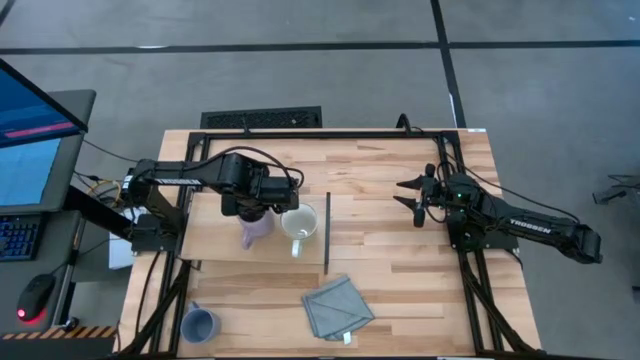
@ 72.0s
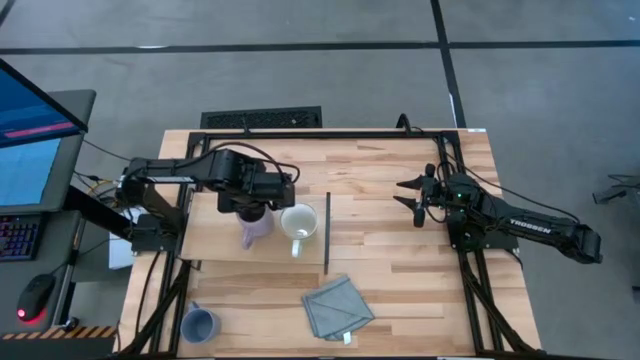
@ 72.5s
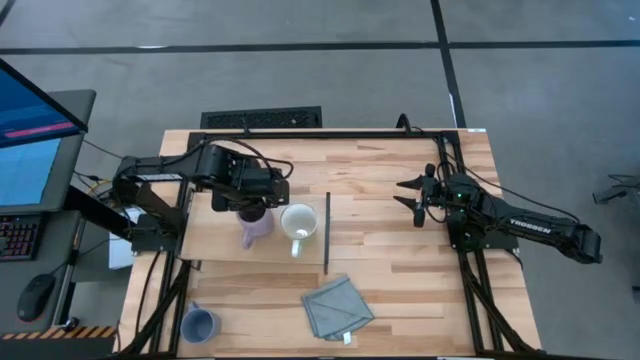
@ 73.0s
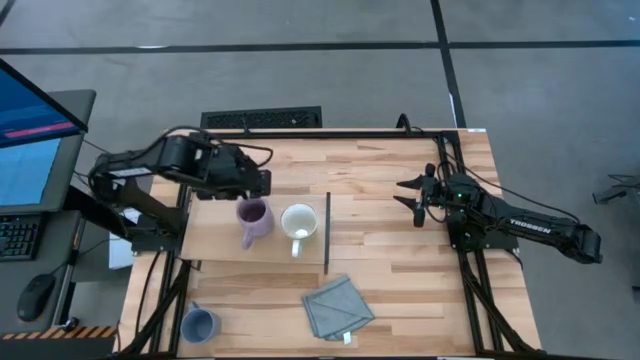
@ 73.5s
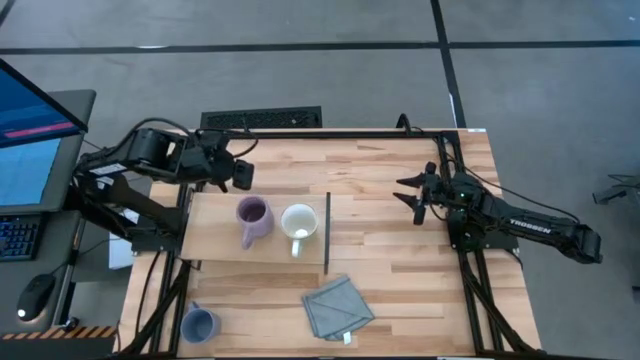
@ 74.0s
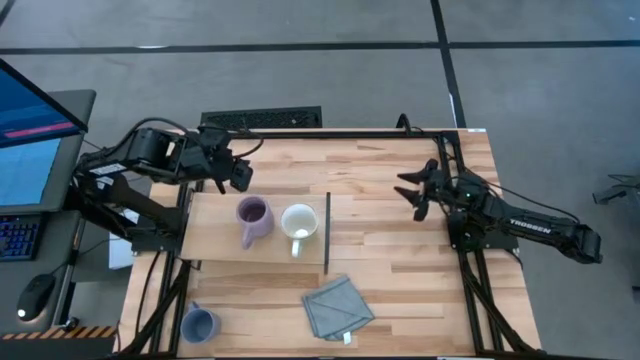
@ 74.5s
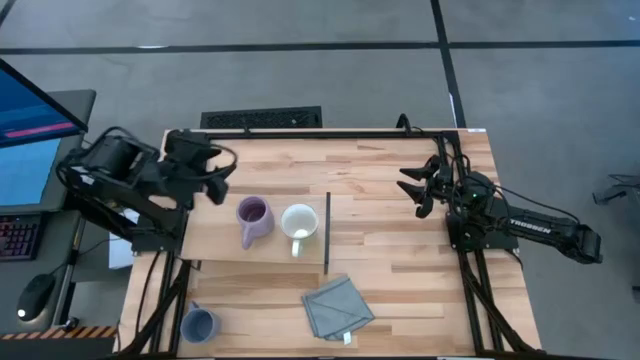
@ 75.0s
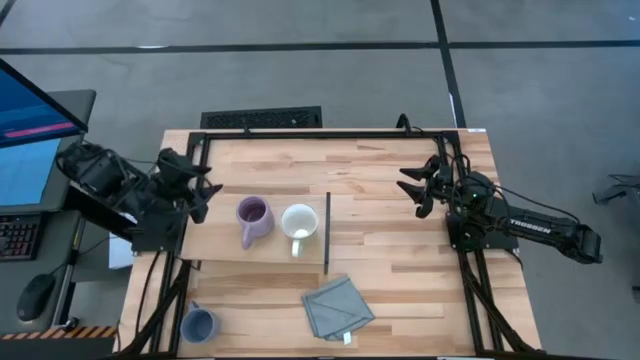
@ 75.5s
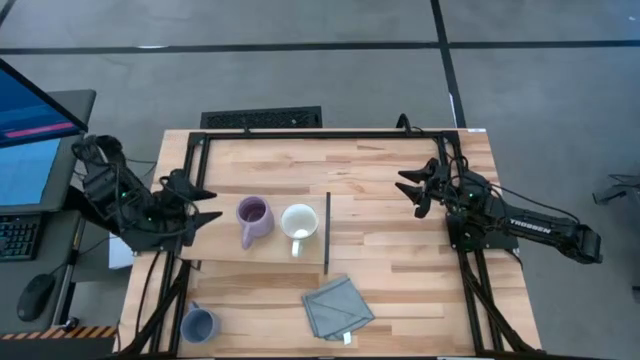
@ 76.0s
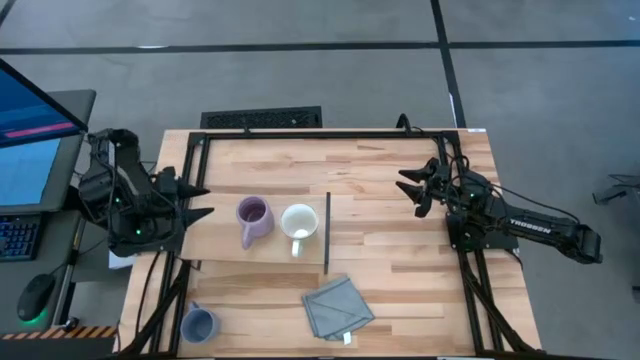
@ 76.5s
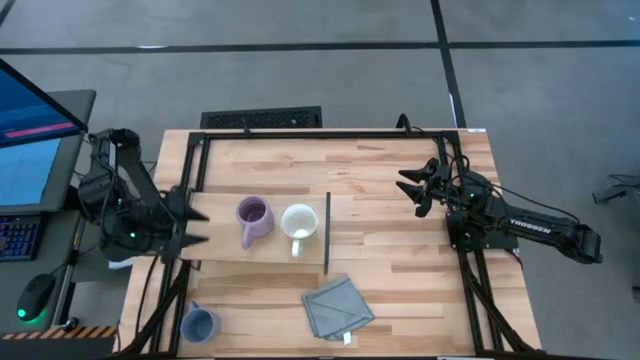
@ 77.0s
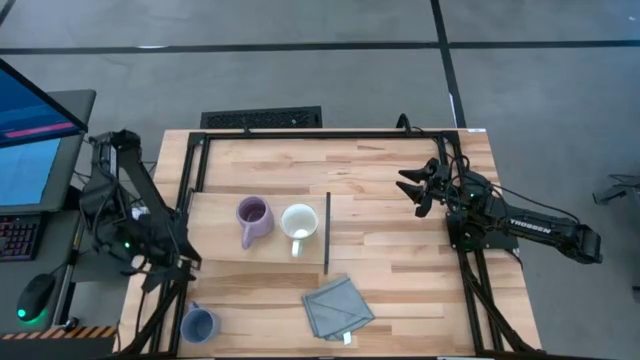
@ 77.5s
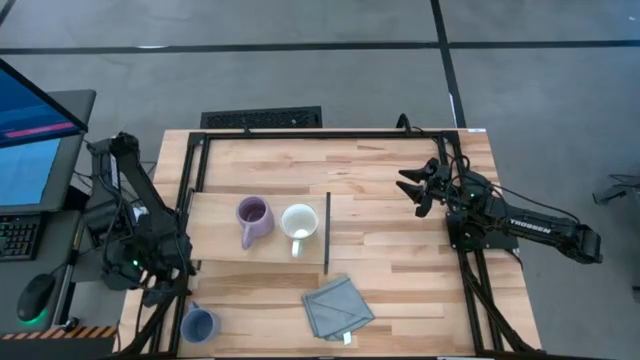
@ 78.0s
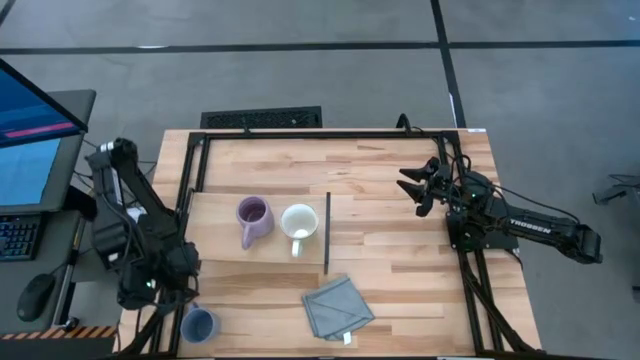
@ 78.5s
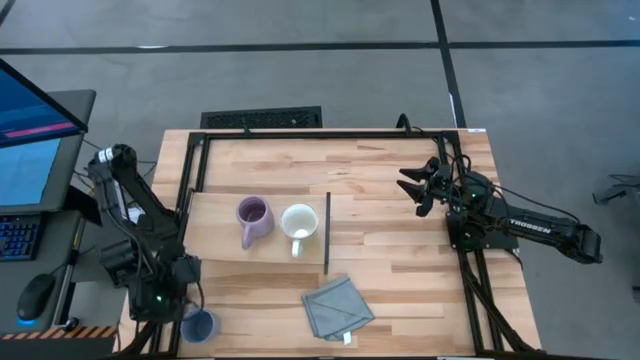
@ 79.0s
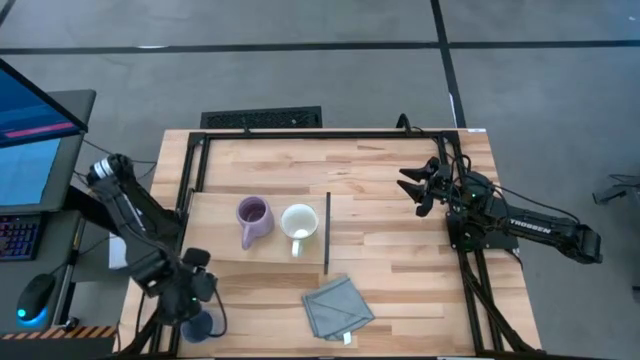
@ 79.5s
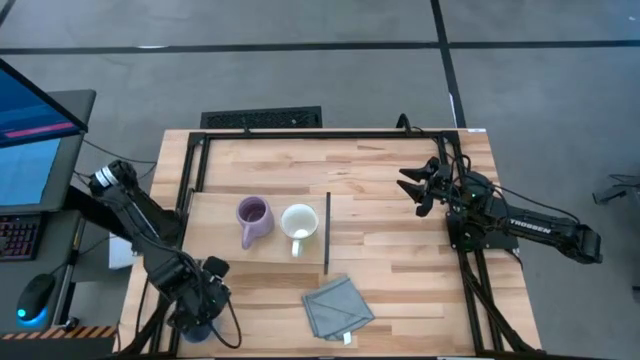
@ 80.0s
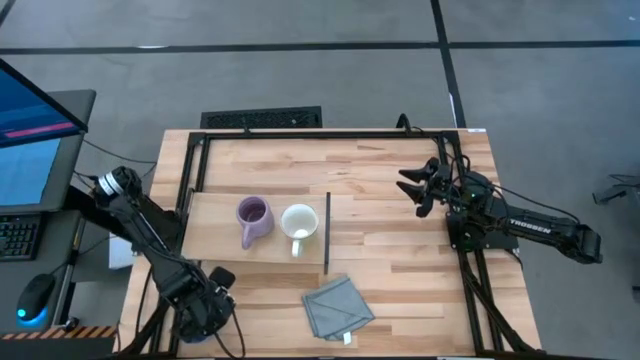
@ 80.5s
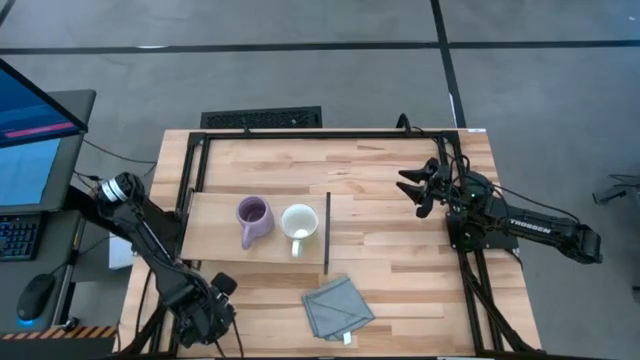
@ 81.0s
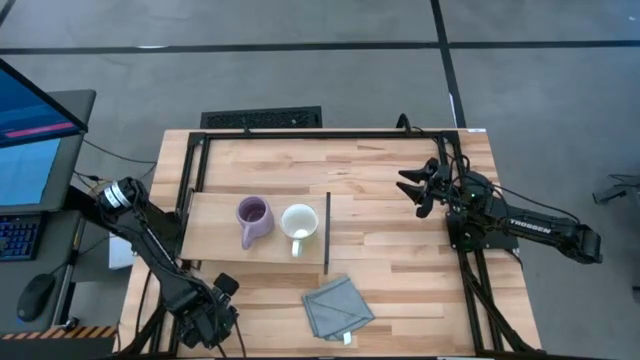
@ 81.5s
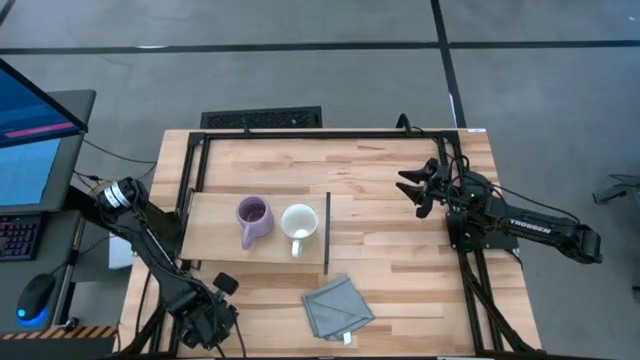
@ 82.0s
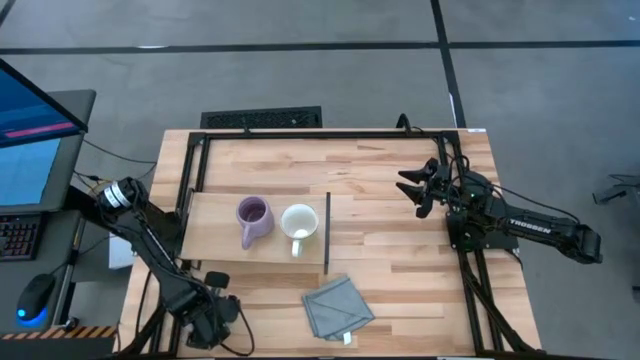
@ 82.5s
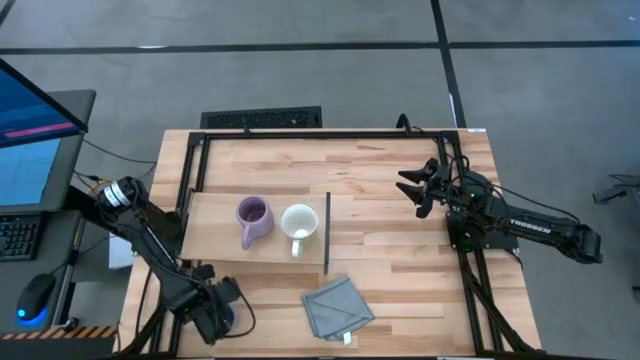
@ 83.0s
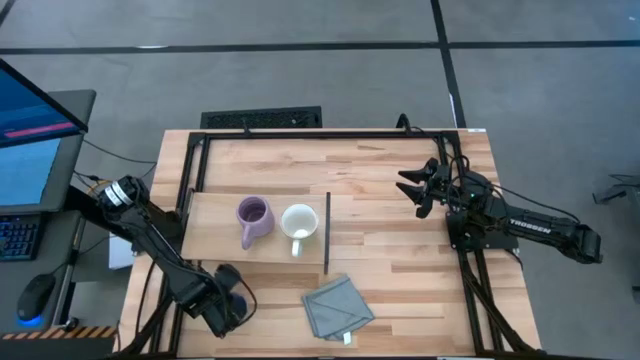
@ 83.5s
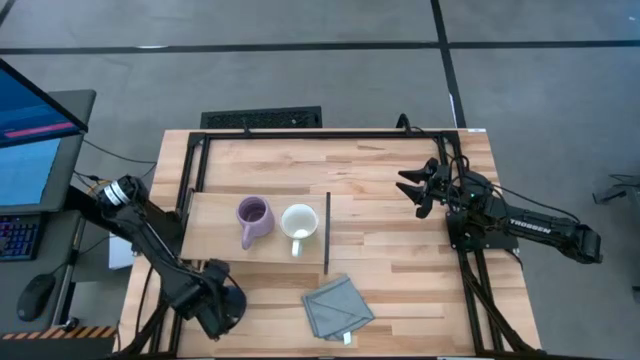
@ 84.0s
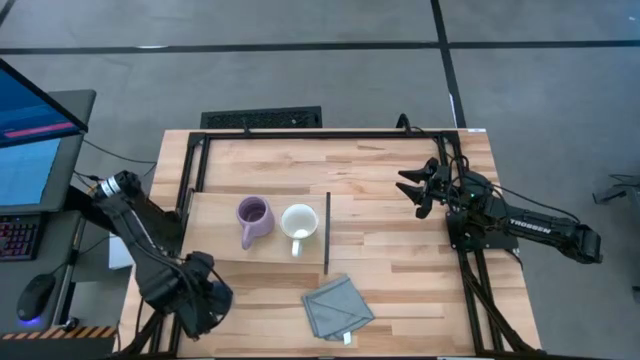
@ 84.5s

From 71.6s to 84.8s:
Task: Stack small to large cups/mugs on shelf
Put the blue mug on the shelf

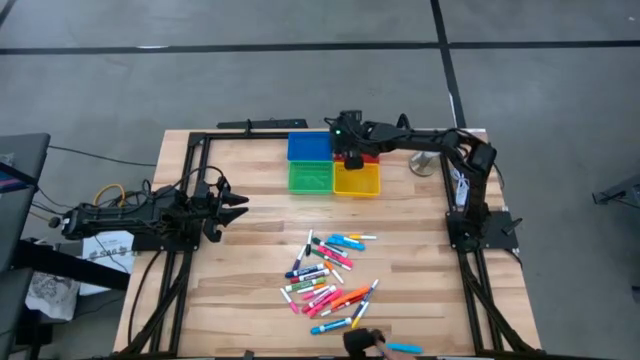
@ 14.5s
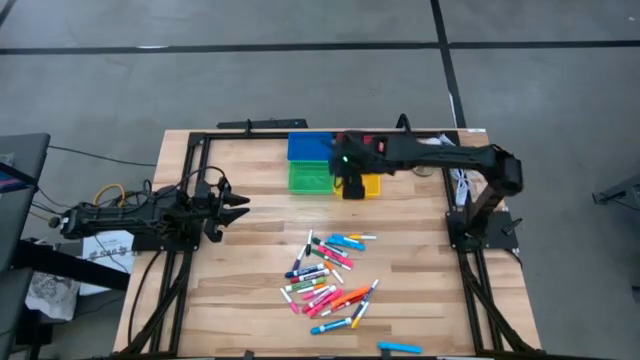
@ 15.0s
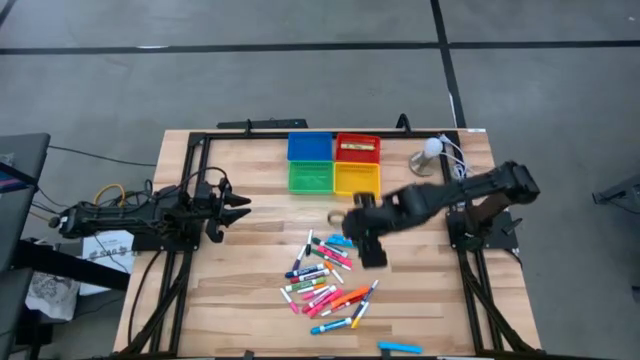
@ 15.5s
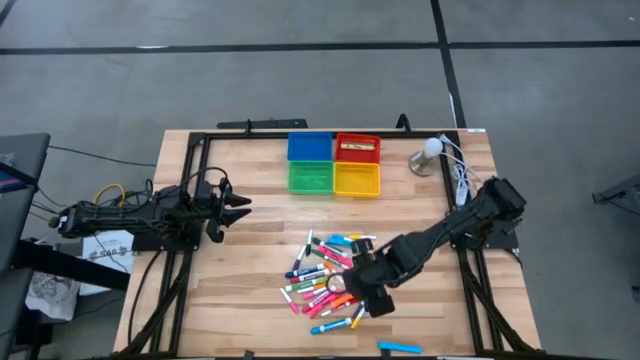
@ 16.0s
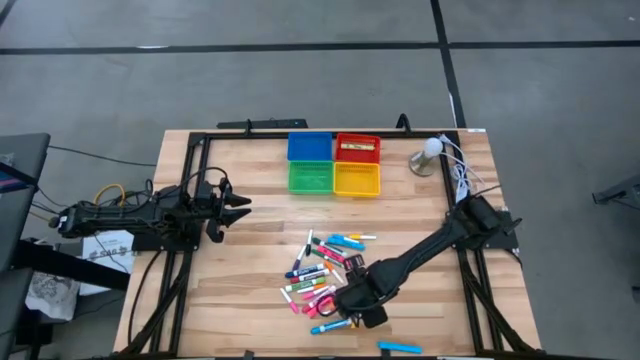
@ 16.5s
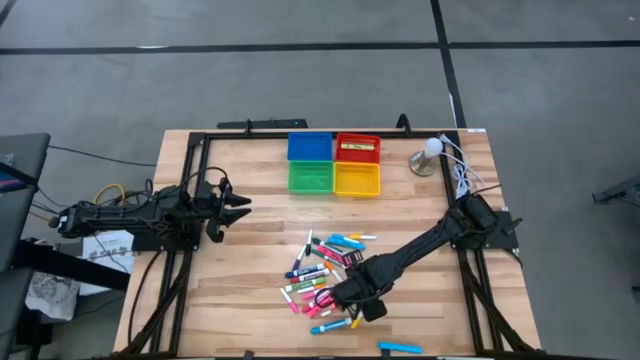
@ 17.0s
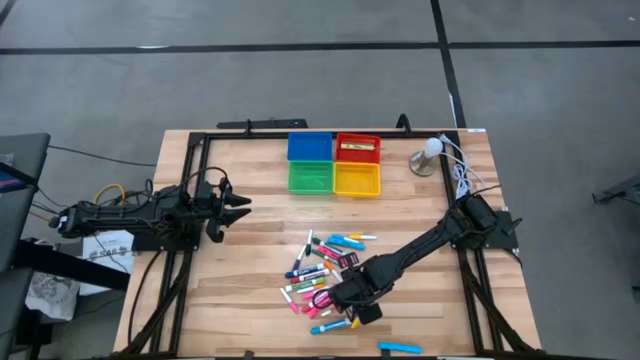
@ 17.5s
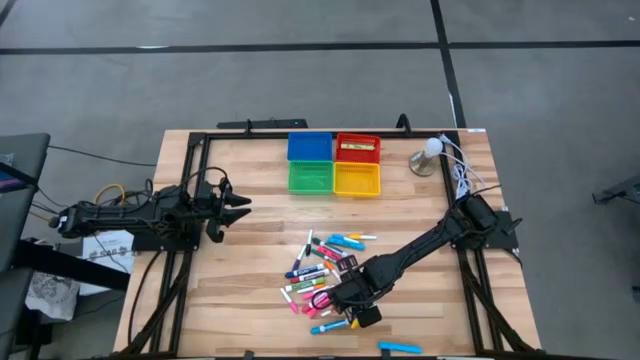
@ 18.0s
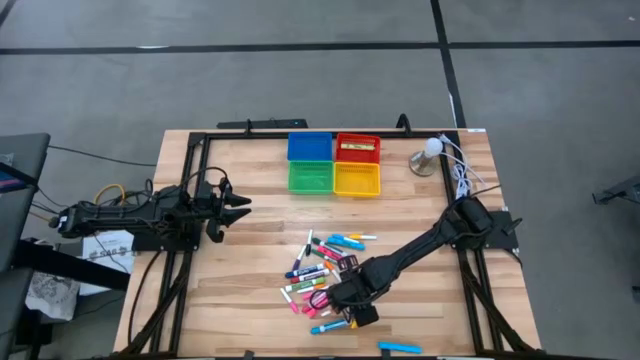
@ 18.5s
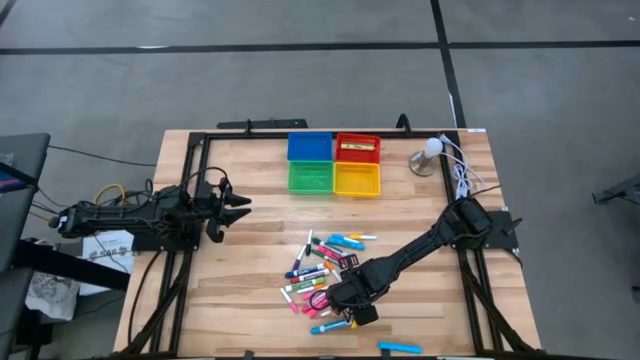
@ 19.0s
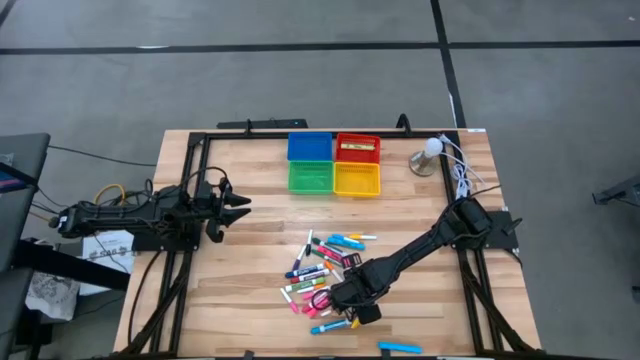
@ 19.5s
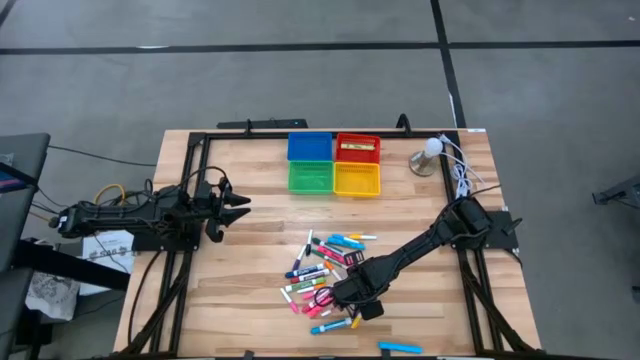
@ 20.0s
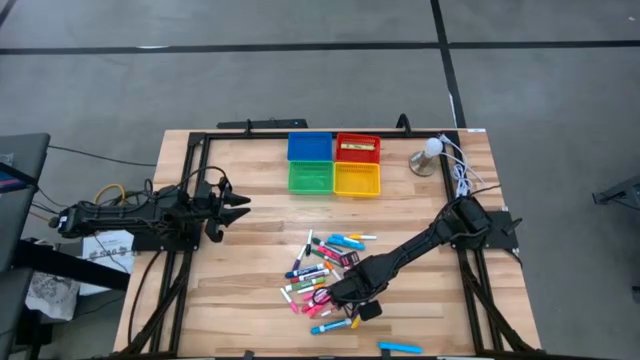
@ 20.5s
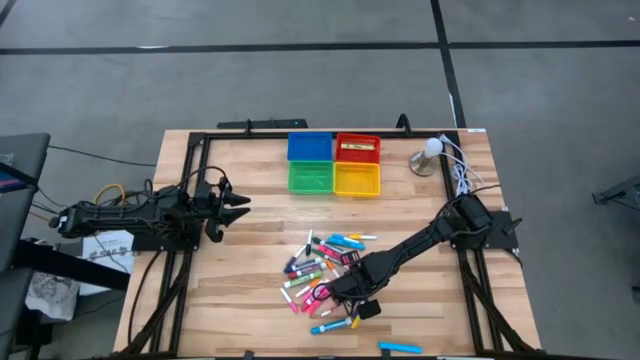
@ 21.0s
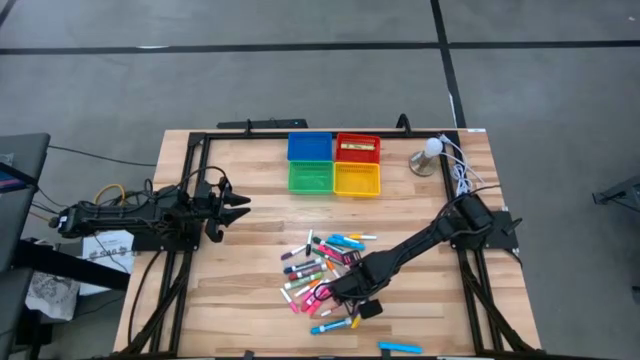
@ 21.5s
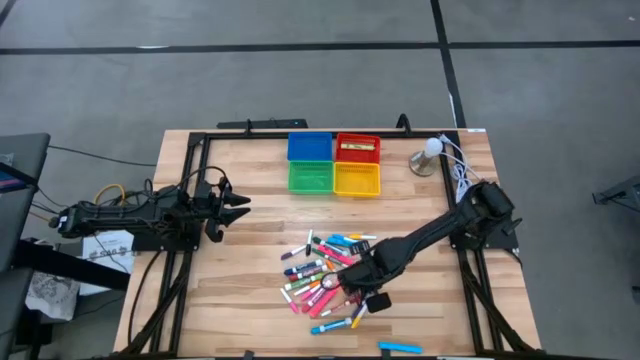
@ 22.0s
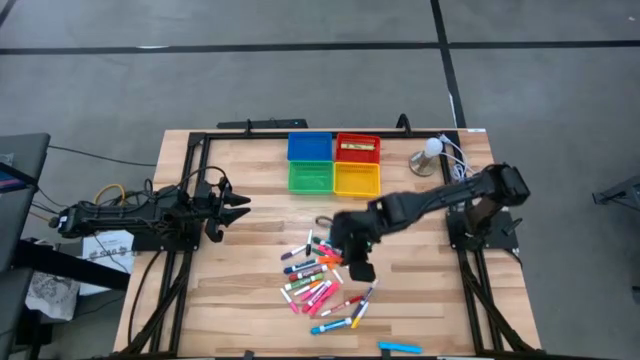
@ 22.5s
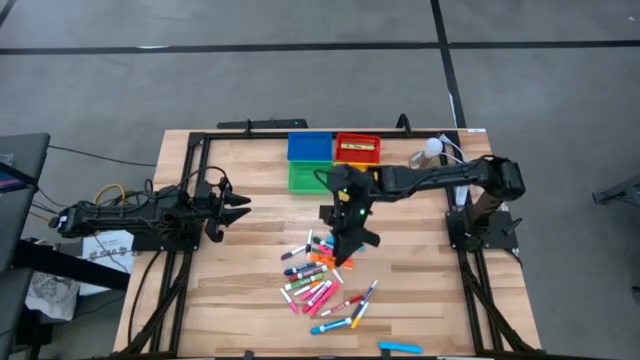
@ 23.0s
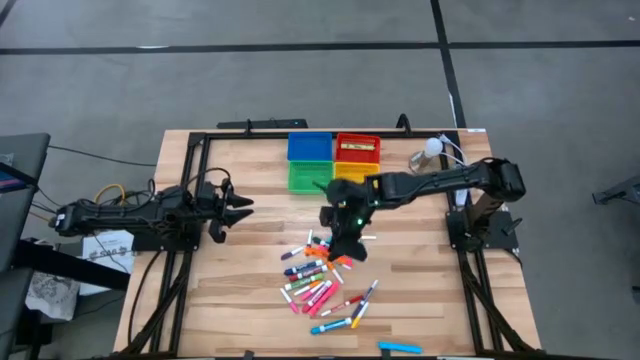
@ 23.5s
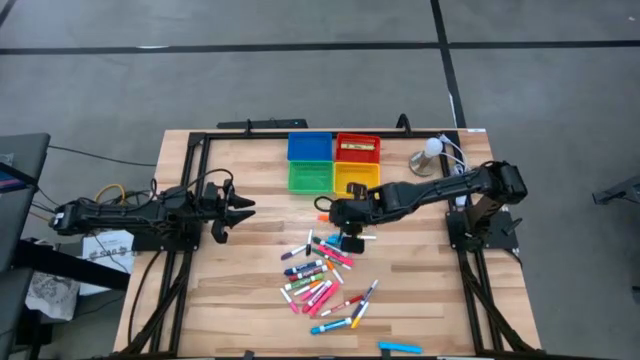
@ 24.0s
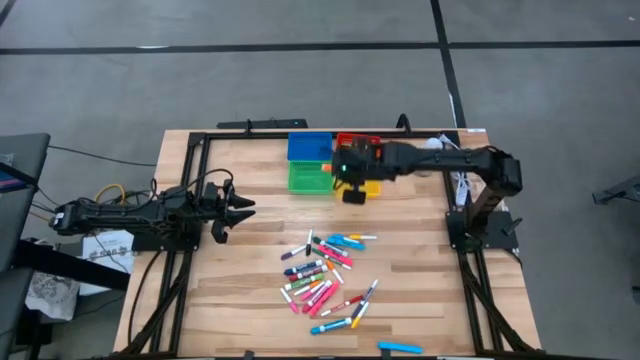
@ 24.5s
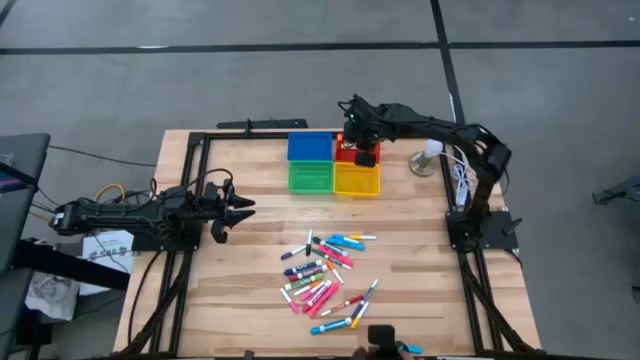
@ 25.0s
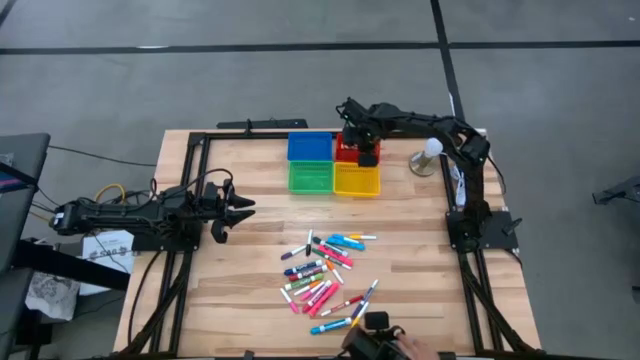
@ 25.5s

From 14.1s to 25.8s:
Task: Pick & Place Markers
Put the orange marker in the red bin
